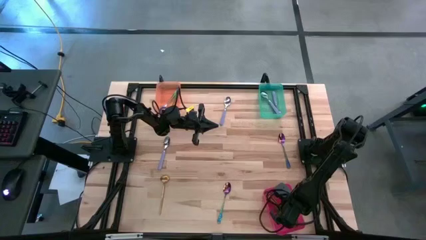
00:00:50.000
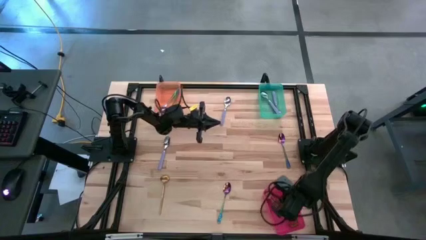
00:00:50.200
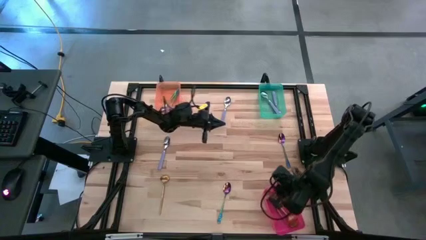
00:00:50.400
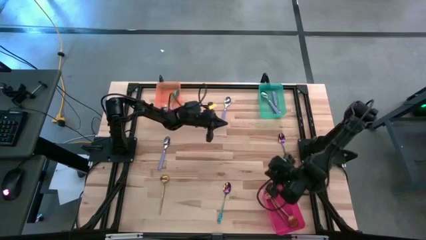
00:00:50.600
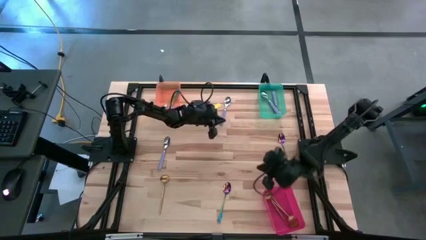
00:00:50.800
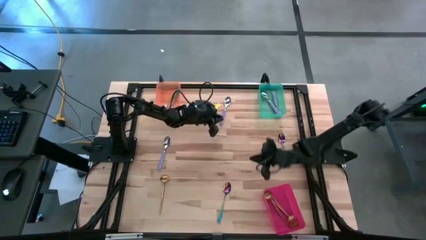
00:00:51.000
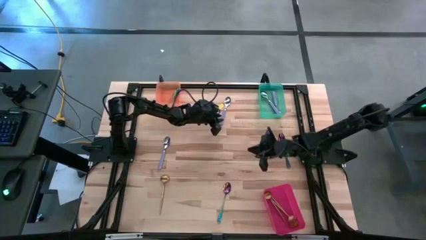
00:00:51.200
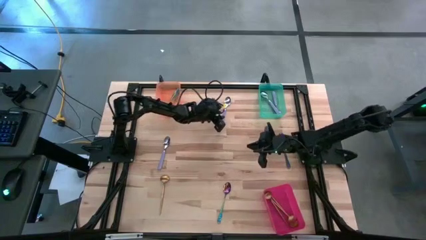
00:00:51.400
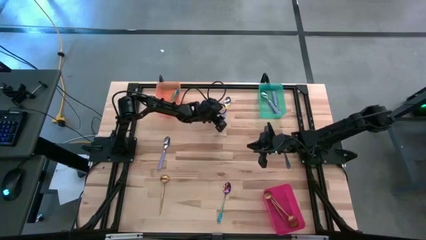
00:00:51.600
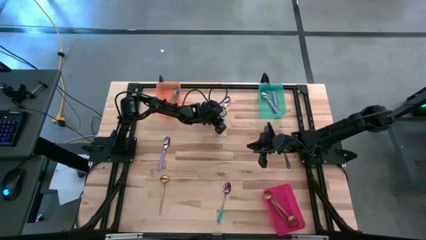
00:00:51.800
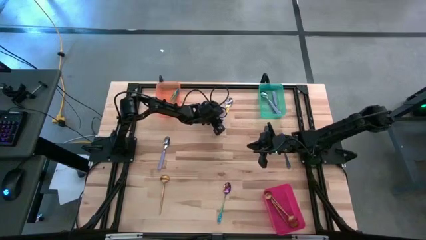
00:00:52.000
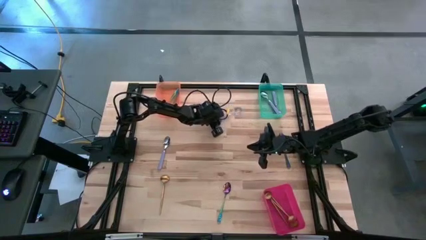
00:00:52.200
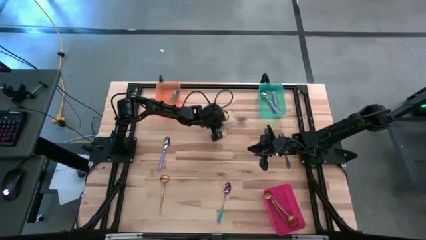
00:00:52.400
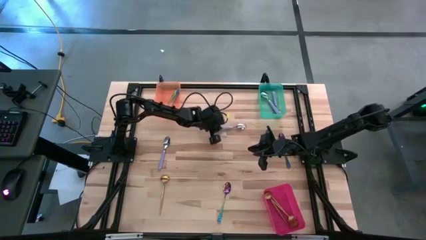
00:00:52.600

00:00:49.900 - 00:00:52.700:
Task: Sort silverware by color (type)
Put the purple spoon into the green bin

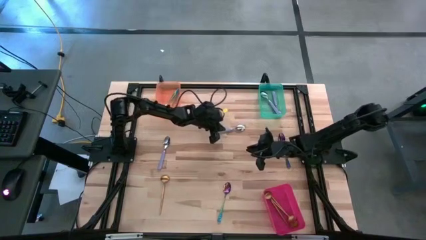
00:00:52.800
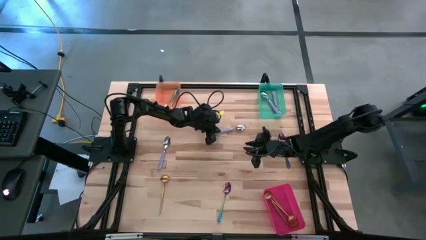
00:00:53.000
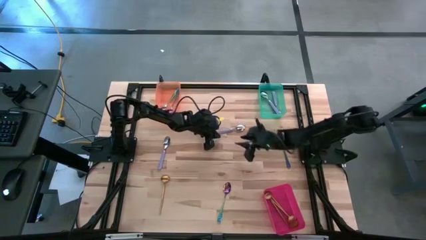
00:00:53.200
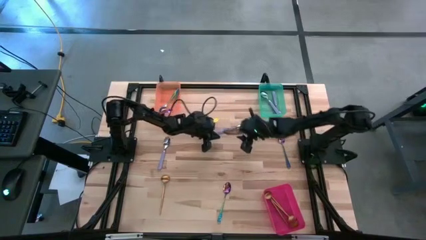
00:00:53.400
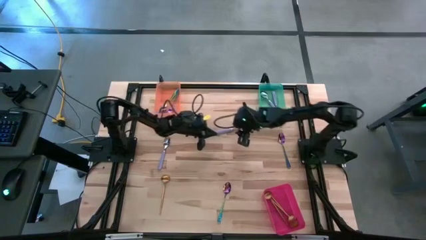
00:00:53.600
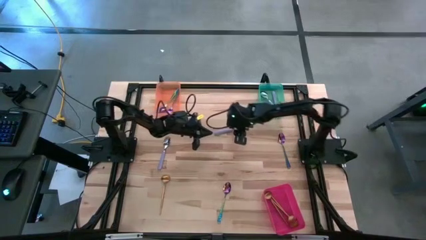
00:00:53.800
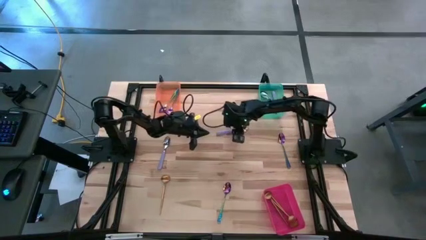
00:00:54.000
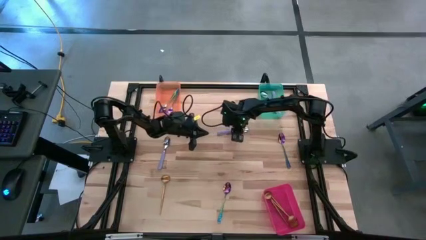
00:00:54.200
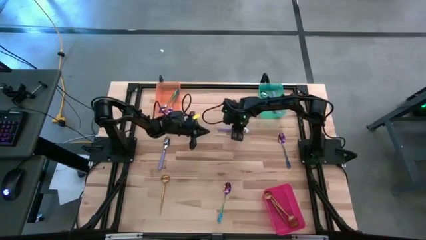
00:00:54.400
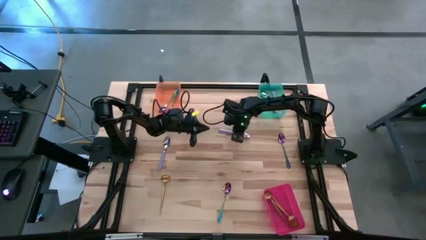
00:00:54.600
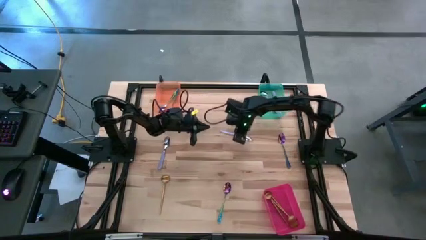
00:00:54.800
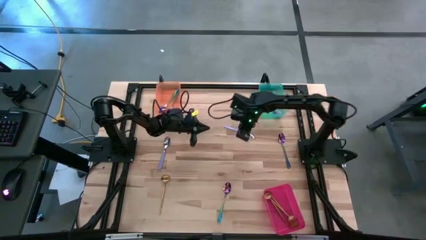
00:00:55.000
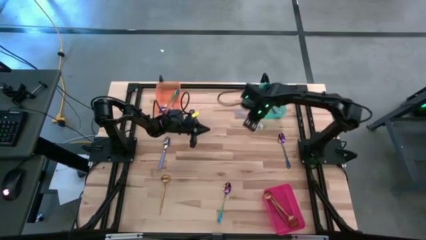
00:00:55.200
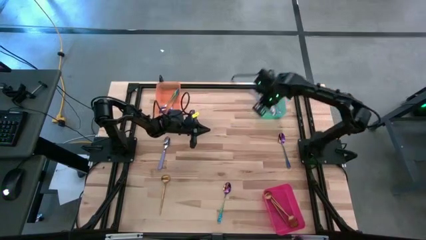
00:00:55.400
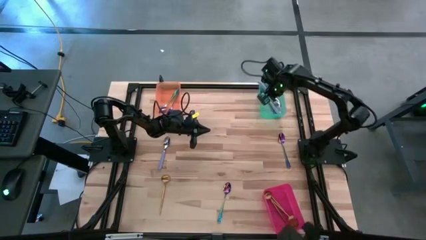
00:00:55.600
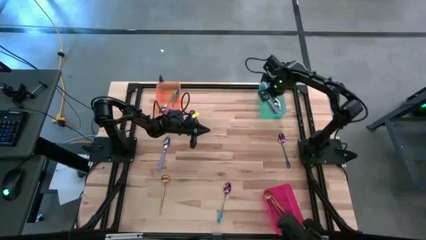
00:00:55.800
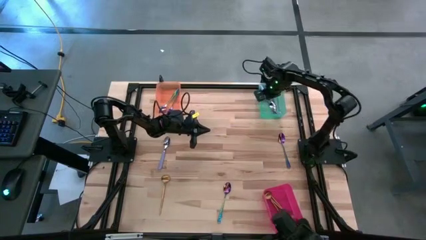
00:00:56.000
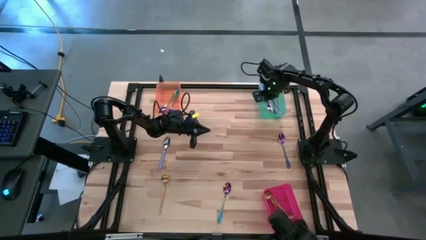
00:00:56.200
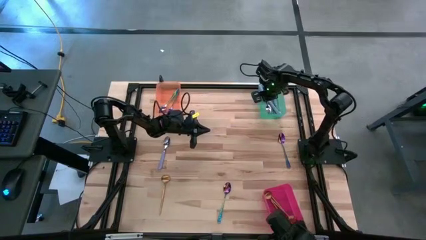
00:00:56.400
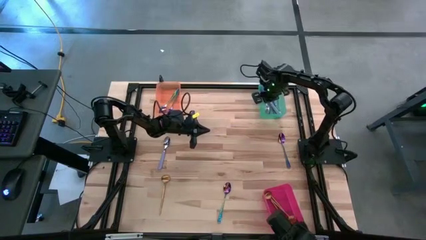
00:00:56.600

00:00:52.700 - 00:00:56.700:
Put the purple spoon into the green bin

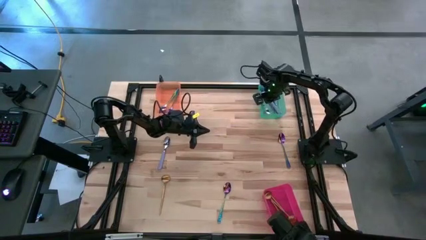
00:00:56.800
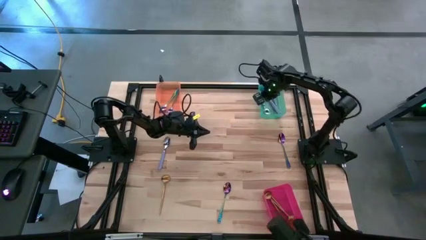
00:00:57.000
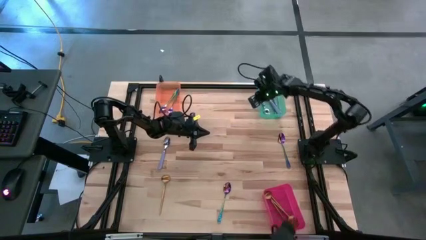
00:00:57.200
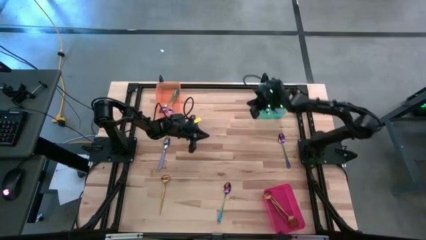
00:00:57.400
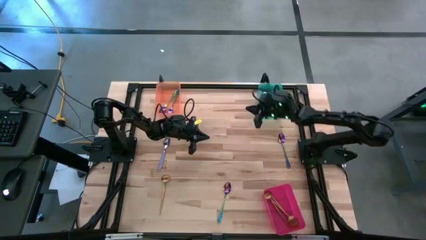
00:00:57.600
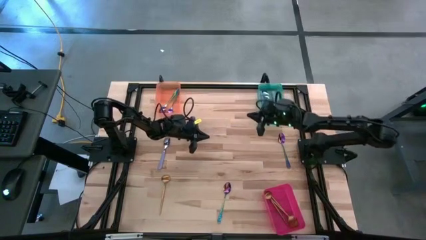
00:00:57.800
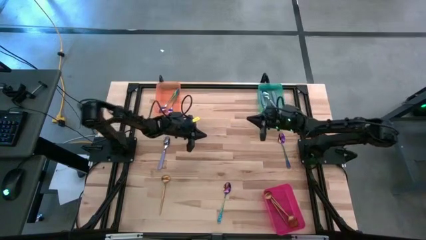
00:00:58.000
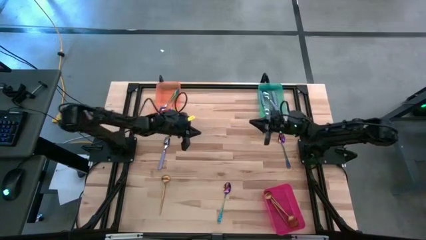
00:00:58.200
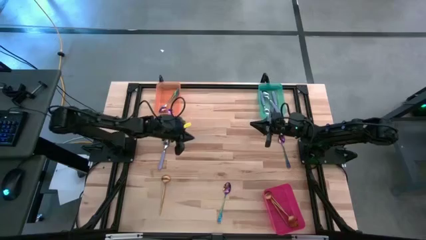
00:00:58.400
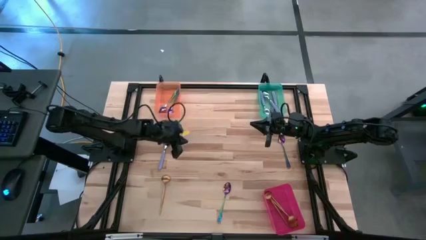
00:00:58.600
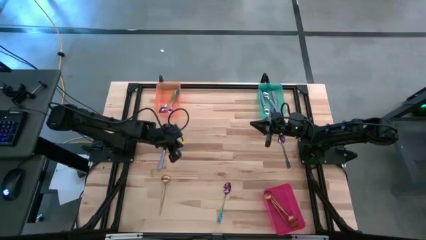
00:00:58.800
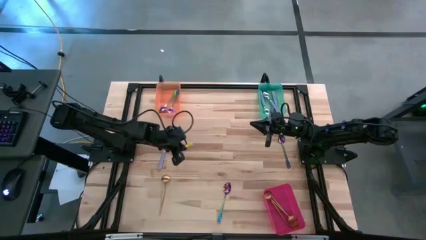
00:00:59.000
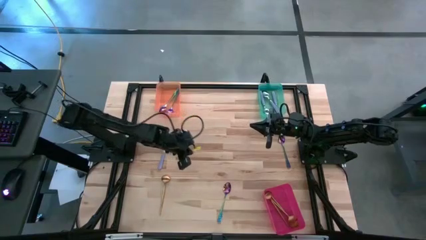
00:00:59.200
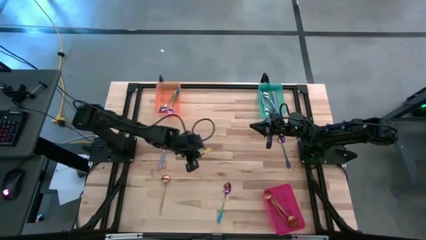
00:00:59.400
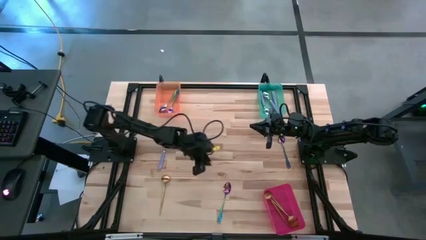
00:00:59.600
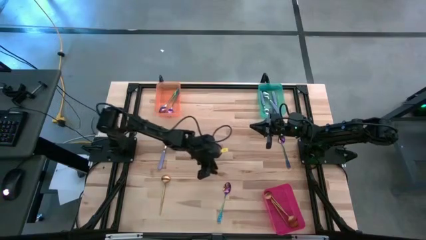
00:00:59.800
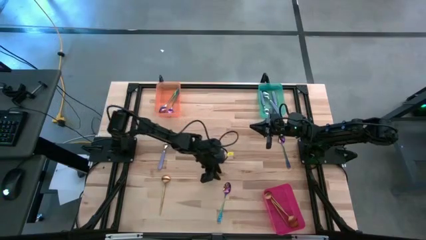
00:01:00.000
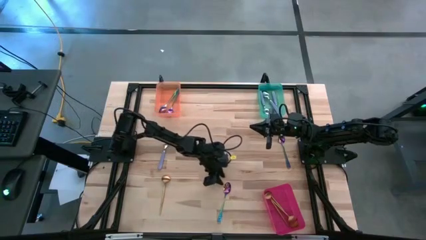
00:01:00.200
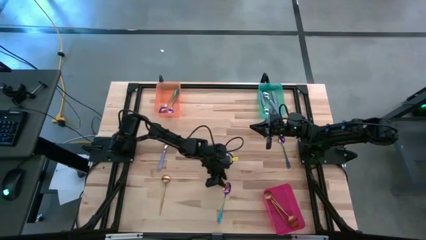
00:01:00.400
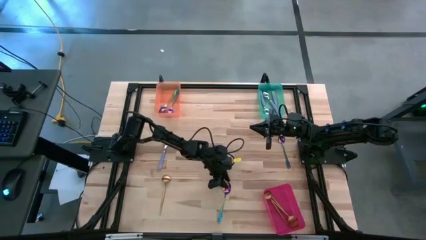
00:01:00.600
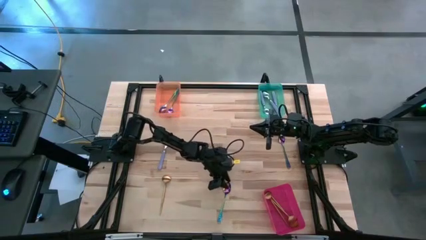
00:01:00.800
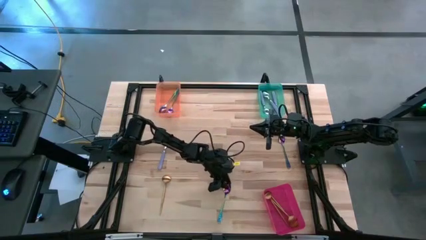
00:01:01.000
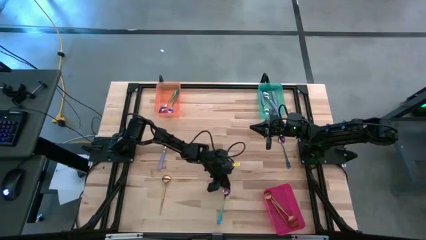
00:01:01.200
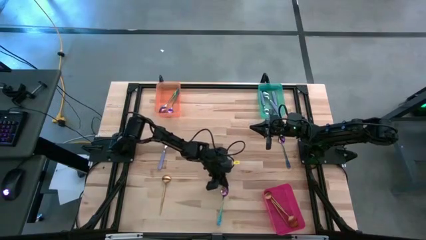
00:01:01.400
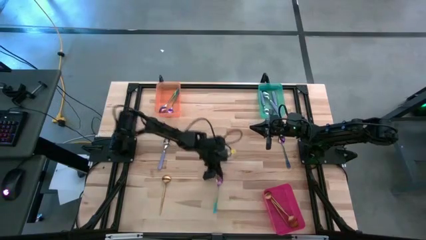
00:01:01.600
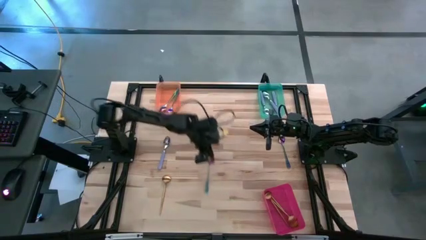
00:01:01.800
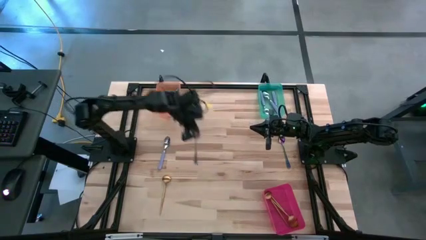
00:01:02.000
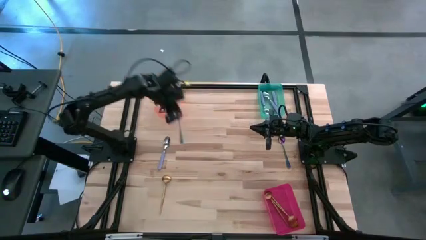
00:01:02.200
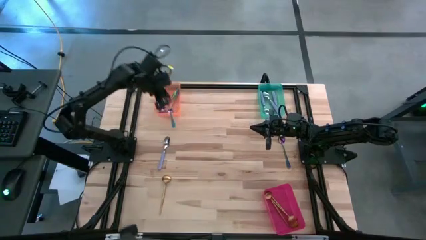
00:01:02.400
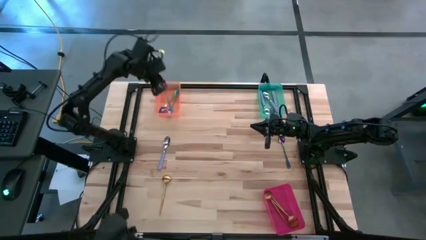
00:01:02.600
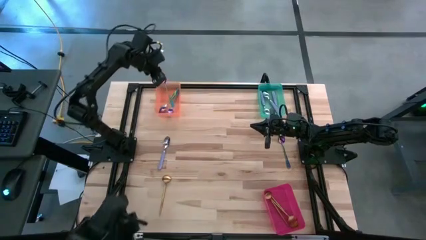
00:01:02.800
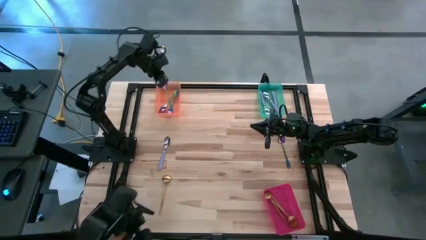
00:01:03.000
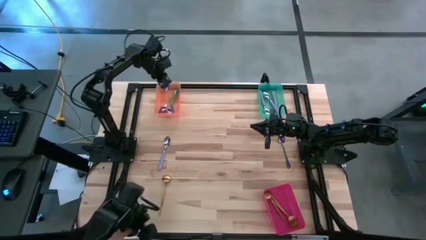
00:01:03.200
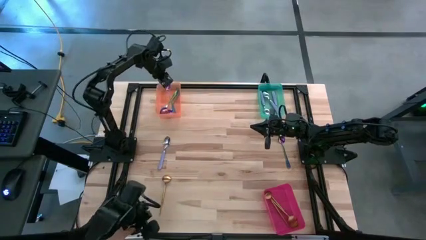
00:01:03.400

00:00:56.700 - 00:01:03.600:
Put the blue spoon into the orange bin

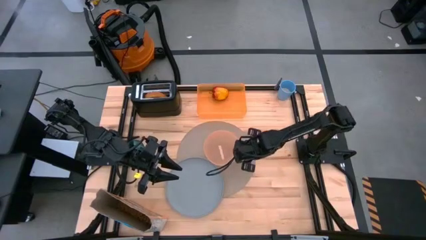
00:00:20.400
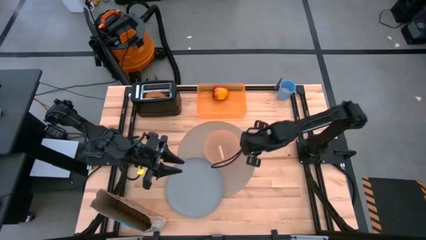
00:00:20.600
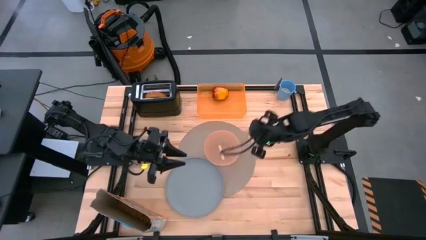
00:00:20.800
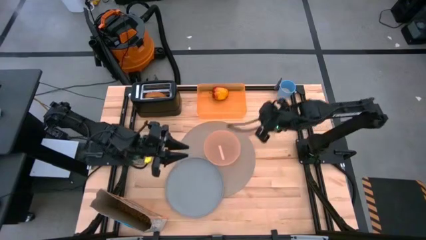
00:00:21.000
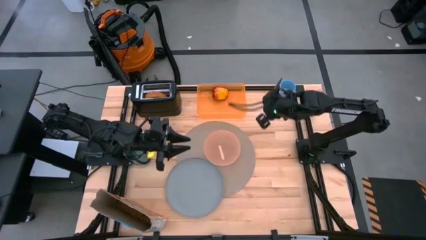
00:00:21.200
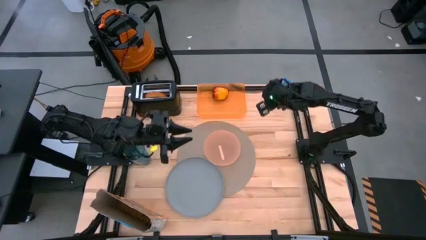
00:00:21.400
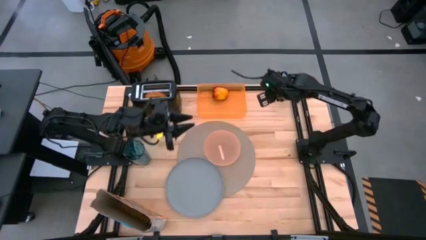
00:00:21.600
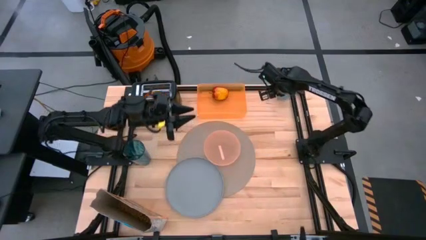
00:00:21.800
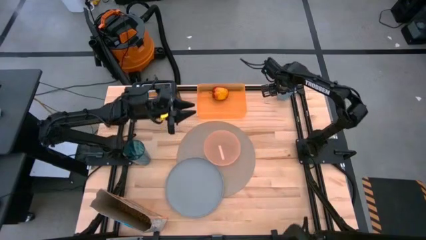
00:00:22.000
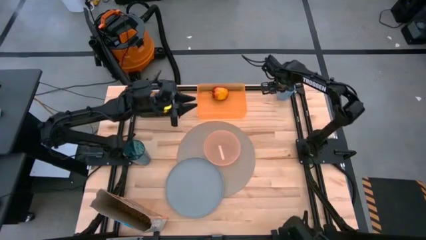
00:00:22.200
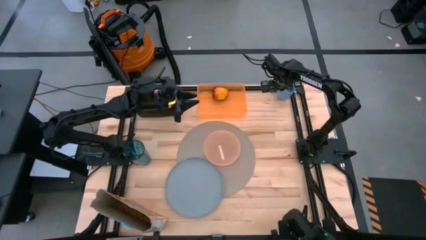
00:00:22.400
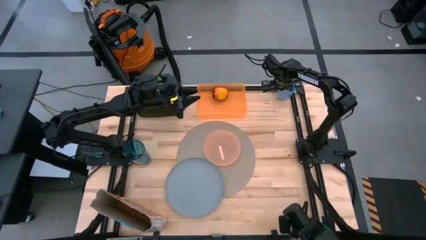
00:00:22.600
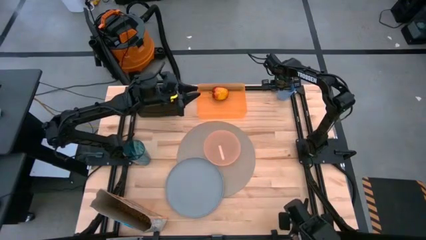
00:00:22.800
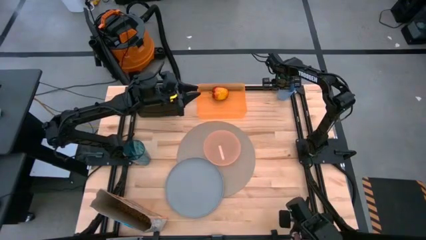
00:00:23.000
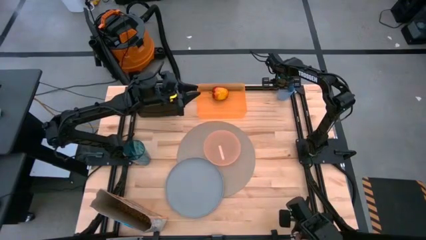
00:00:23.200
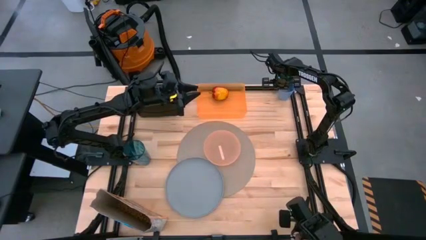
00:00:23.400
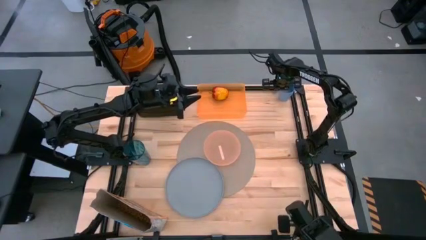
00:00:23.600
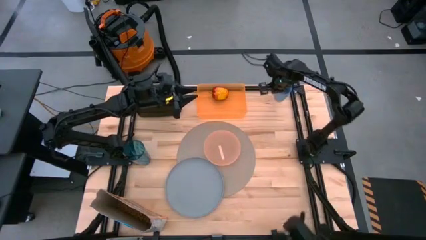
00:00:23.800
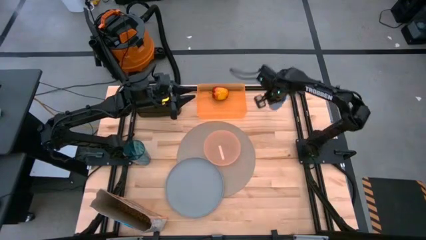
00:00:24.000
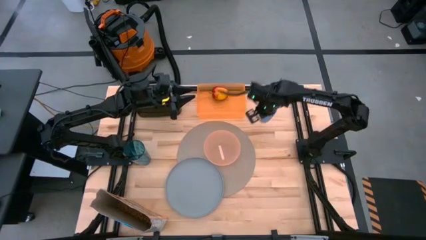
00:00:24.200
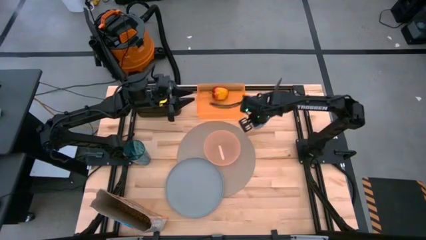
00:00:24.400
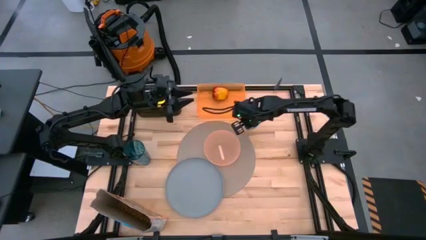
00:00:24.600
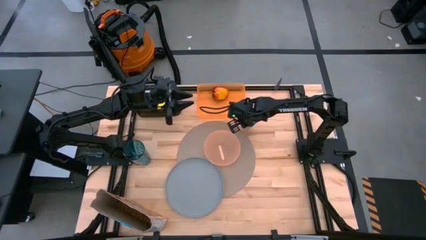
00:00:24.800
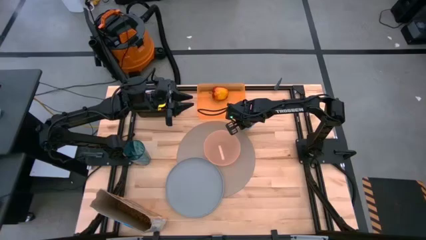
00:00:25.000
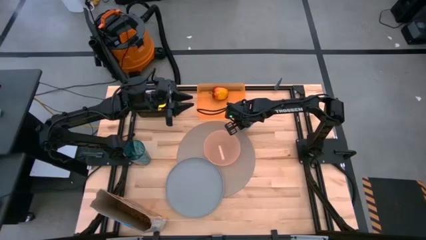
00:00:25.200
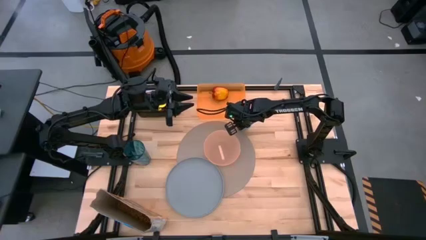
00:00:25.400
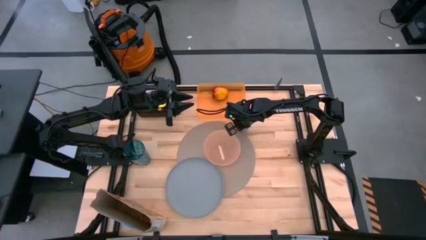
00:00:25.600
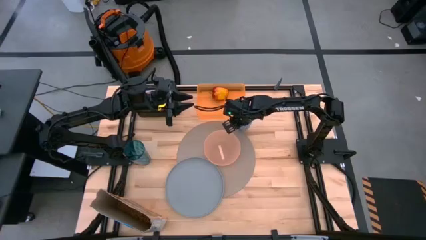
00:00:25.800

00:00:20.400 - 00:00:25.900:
Task: Arrange a breakfast setting
Put the blue cup on the top right of the table above the gray placemat
